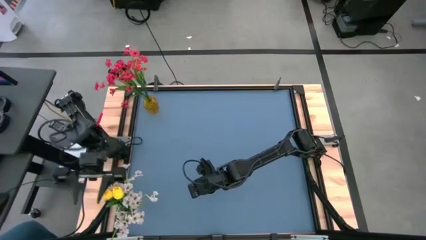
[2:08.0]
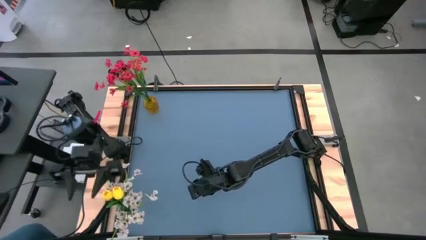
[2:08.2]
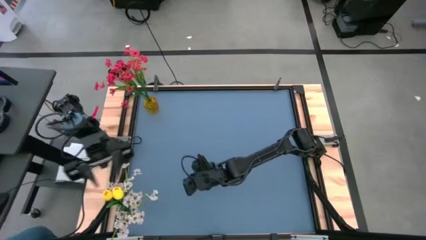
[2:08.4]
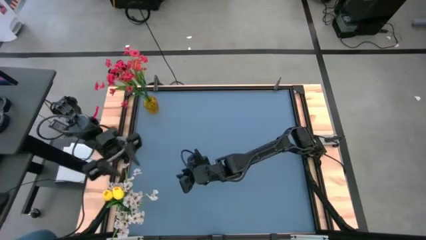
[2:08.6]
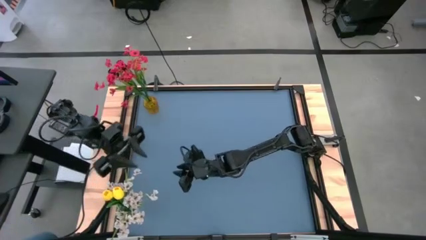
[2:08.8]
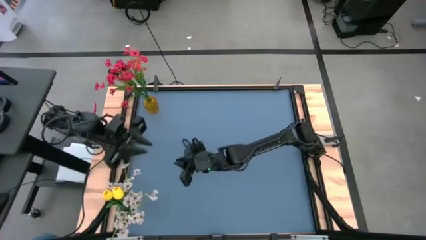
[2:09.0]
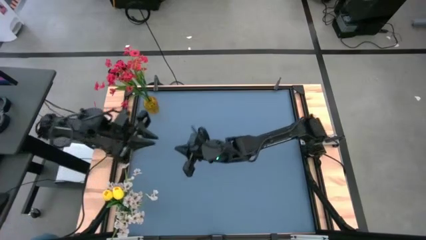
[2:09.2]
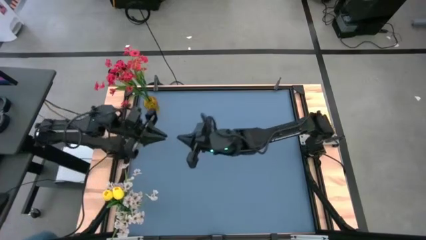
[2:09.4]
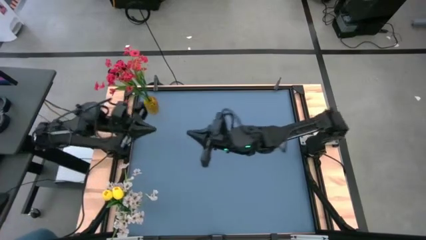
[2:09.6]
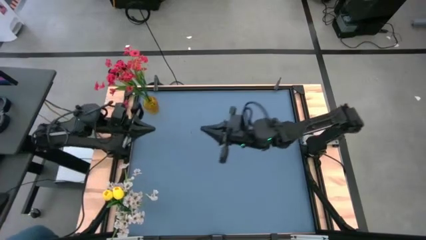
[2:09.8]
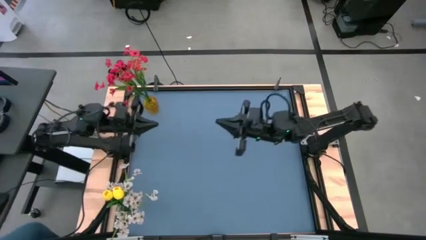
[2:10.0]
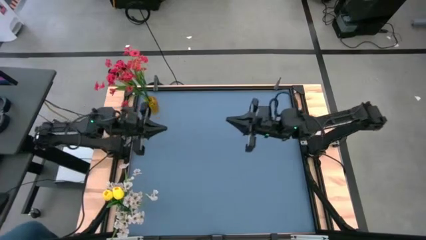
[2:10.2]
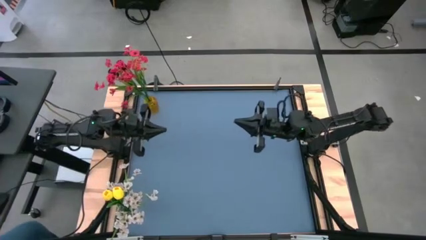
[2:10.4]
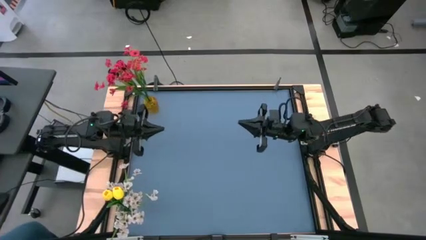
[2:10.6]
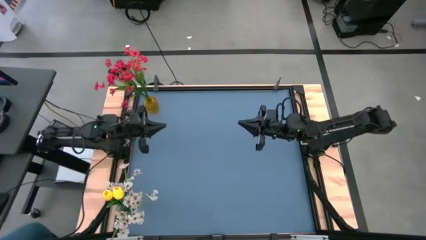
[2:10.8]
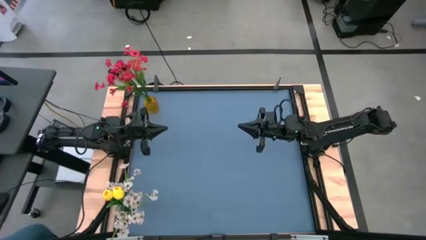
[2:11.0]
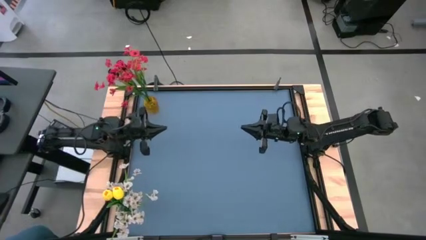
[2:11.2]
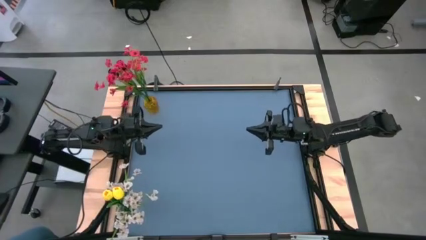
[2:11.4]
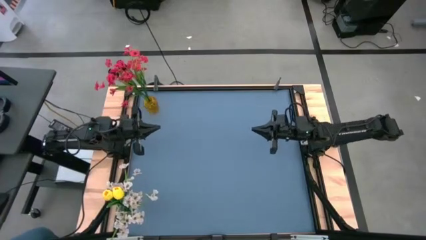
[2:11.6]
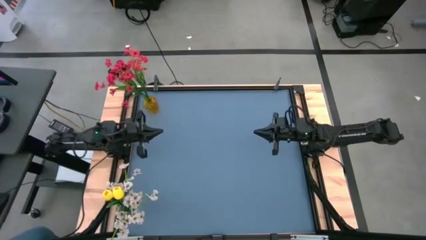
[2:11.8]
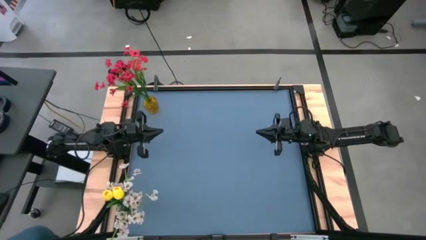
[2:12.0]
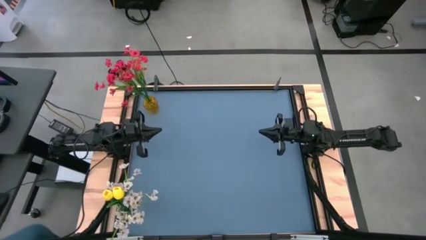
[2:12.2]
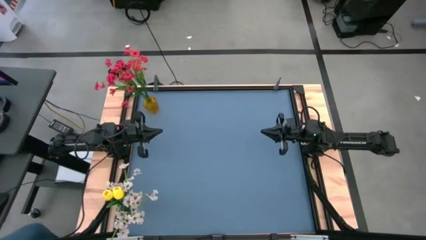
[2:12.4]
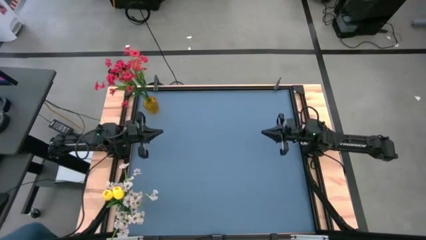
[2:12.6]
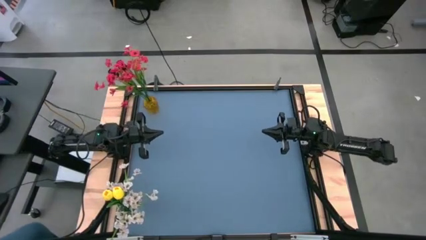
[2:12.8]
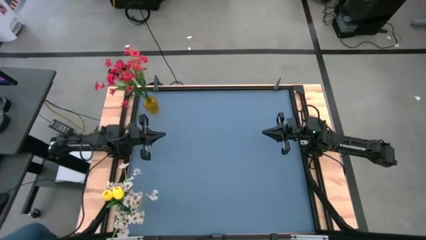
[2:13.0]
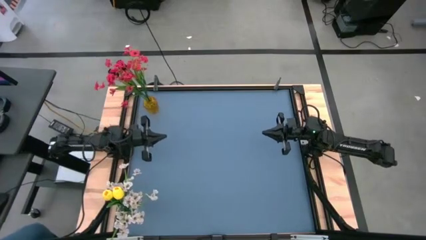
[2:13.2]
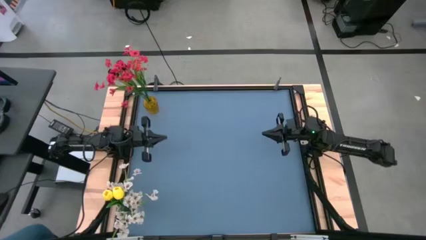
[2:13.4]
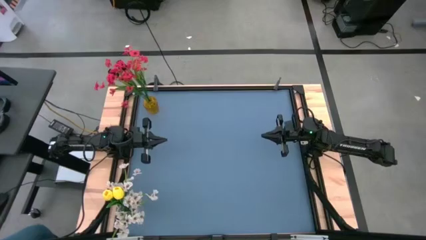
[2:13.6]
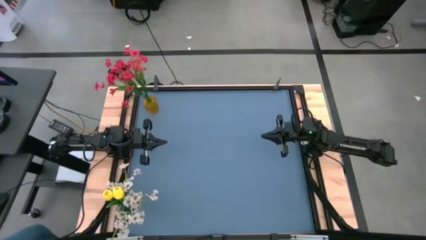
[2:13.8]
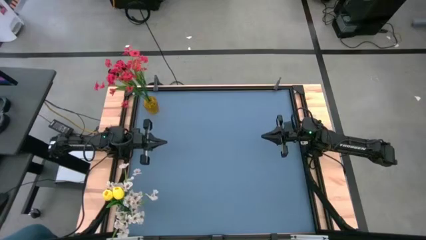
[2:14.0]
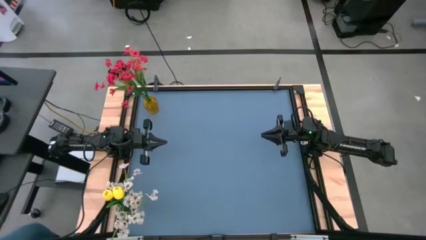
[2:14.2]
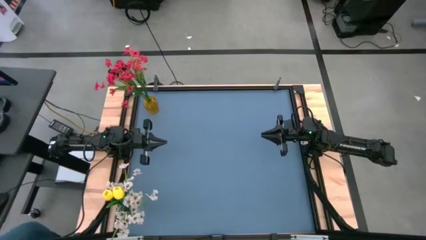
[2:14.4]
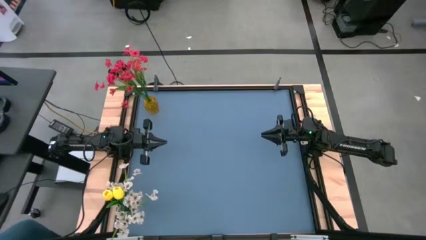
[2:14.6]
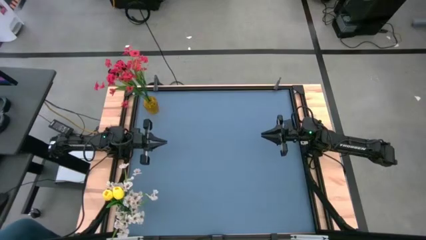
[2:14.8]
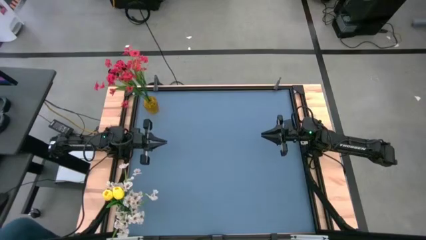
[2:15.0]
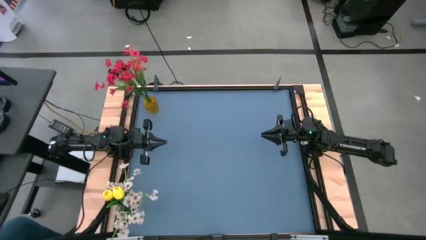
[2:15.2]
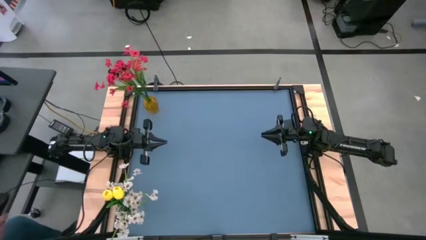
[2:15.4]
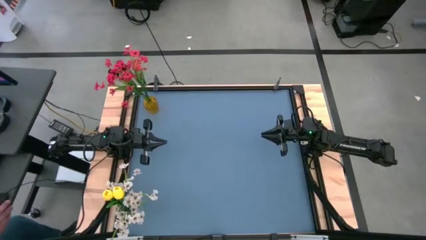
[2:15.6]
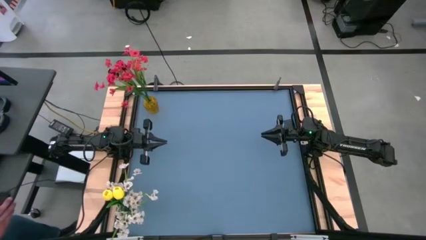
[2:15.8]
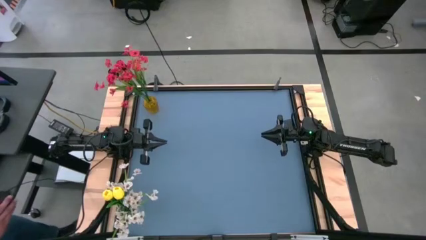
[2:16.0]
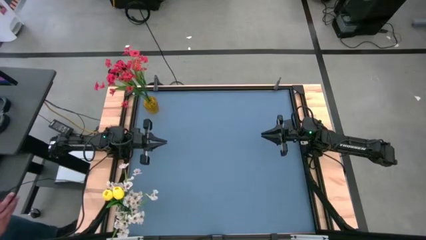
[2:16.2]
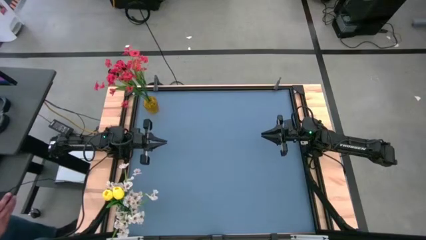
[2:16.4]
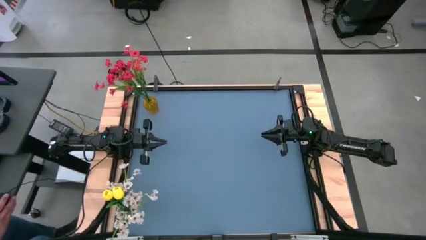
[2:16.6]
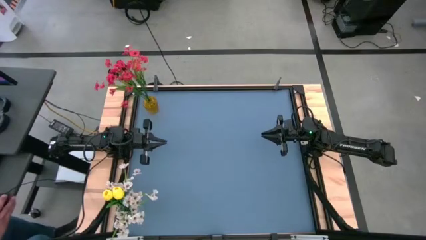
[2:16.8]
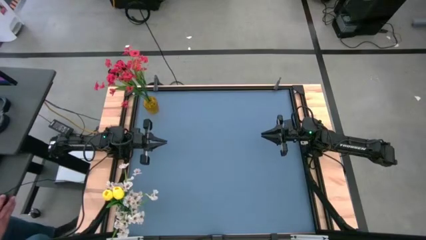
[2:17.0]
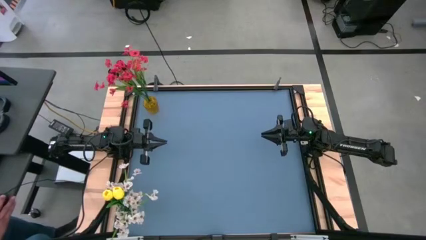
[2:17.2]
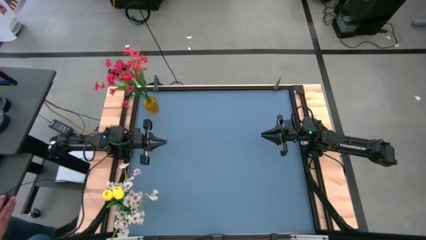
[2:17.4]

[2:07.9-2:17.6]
Task: Sort flowers into vase by color
Return to Home Position
